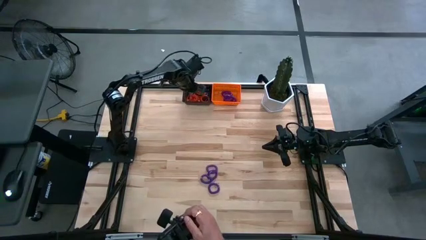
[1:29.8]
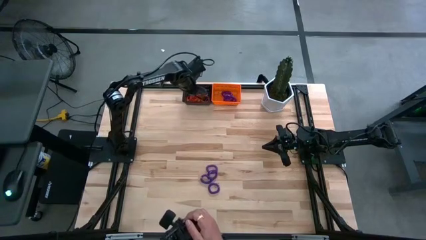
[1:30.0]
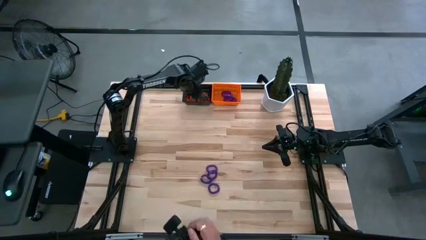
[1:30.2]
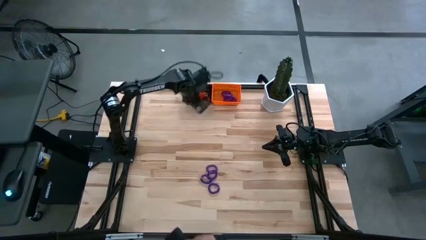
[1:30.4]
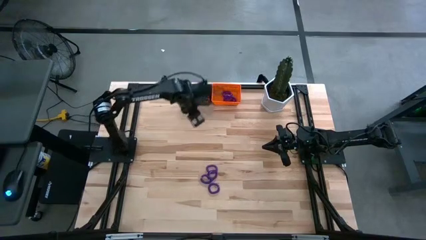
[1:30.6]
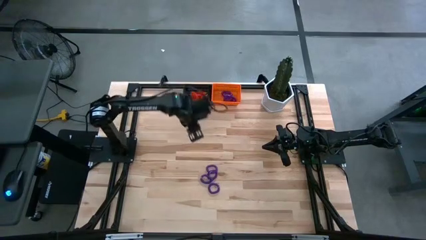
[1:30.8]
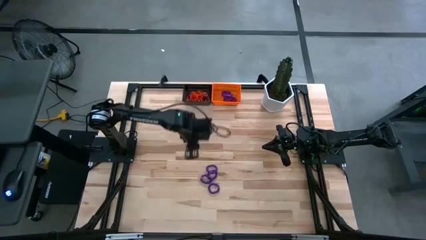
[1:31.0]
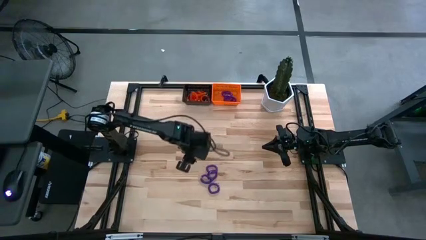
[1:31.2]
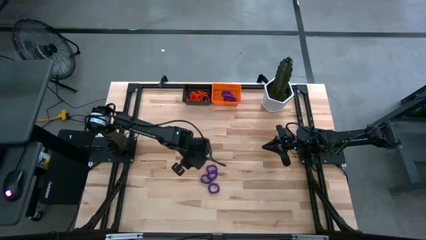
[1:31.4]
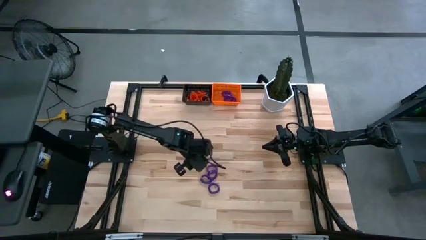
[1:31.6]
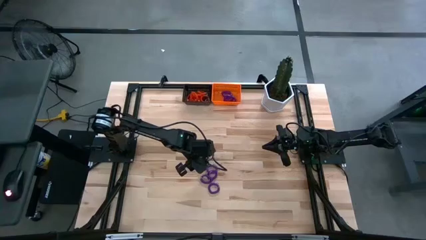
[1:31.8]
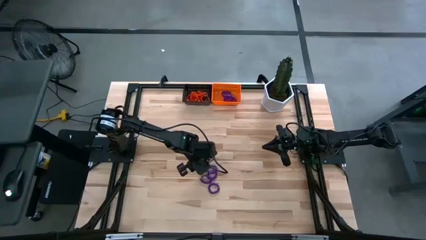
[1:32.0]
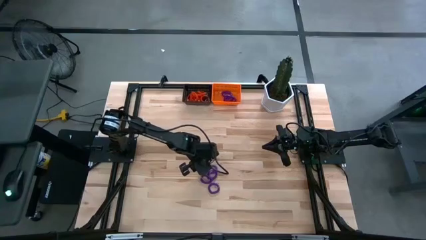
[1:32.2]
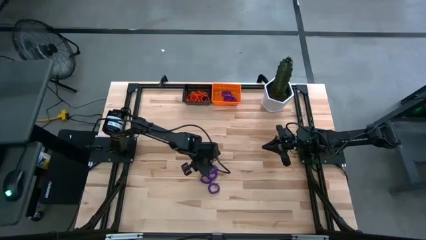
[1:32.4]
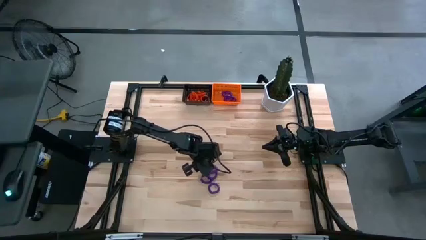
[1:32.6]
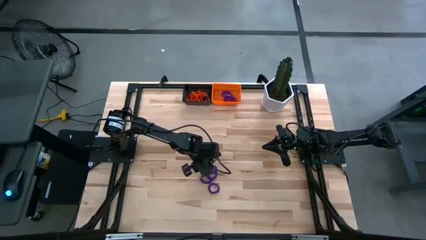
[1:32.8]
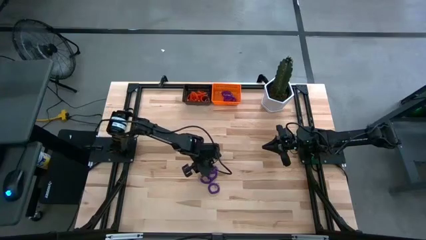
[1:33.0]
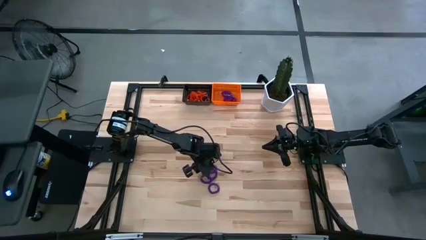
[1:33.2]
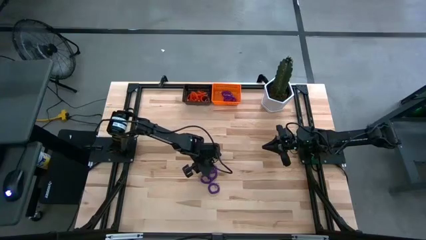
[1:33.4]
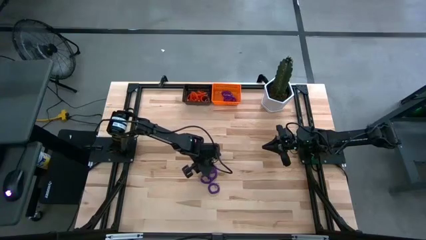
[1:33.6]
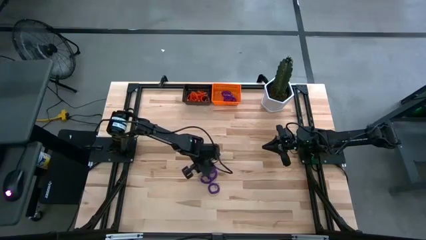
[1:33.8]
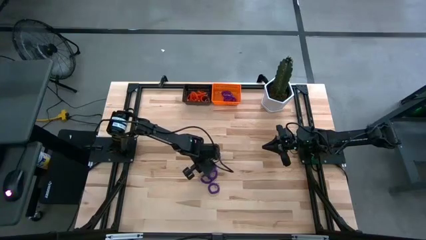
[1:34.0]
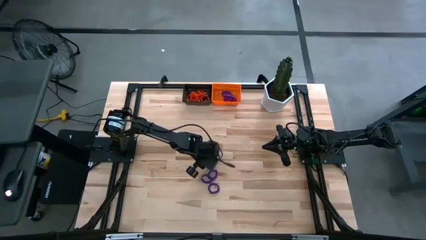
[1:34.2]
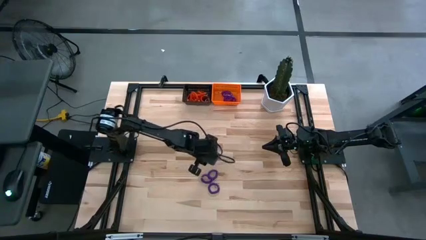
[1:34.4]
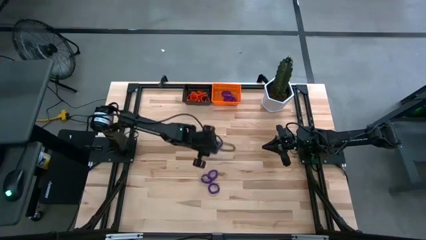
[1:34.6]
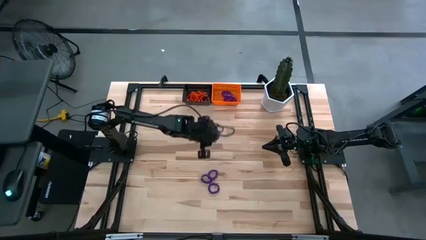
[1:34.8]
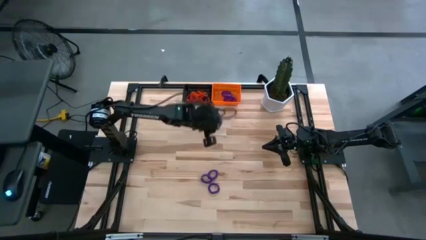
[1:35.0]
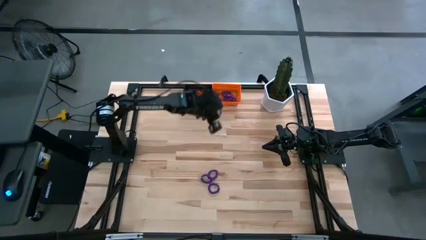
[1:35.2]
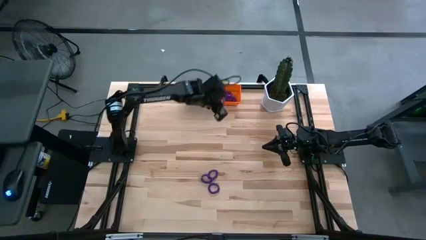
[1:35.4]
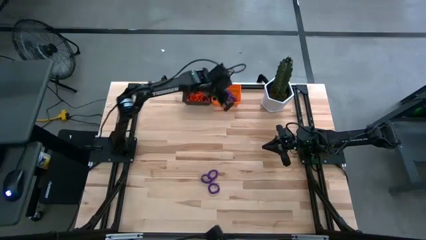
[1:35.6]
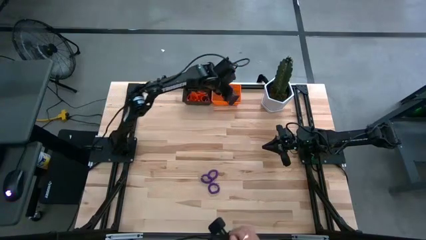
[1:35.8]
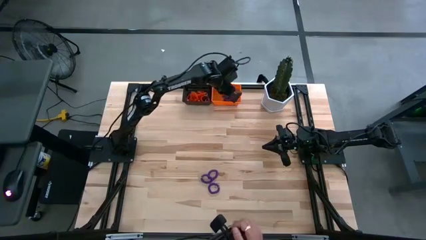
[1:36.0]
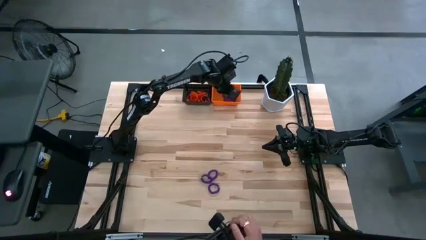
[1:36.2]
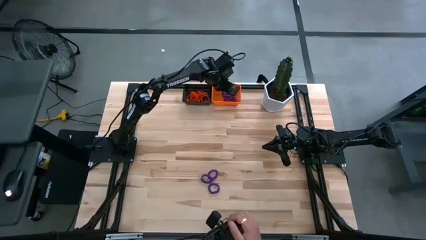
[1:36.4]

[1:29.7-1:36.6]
Task: Sort spring keychains into baskets
Put the violet spring keychain into the orange basket

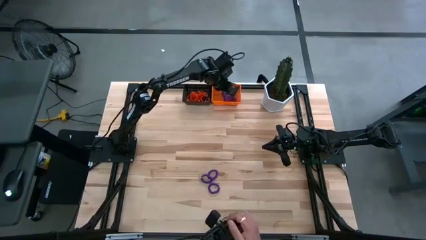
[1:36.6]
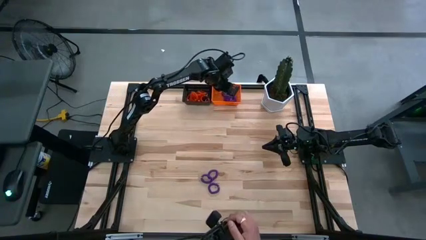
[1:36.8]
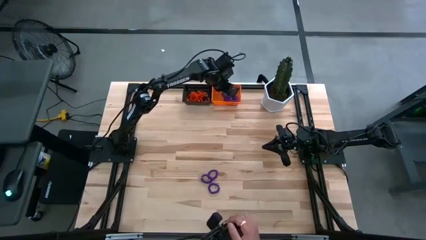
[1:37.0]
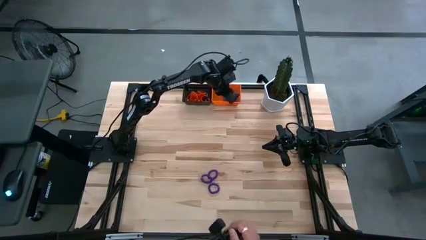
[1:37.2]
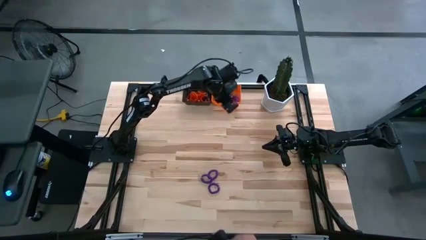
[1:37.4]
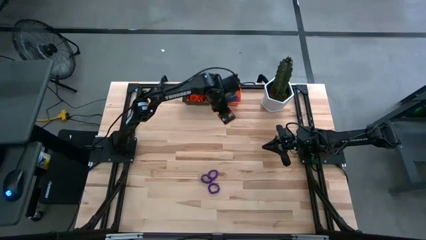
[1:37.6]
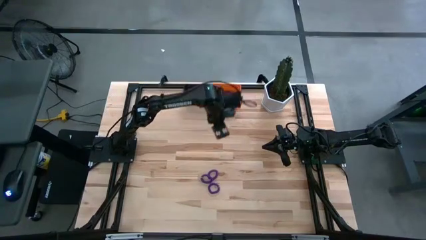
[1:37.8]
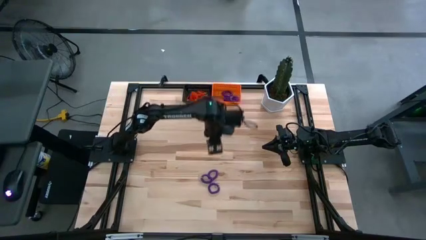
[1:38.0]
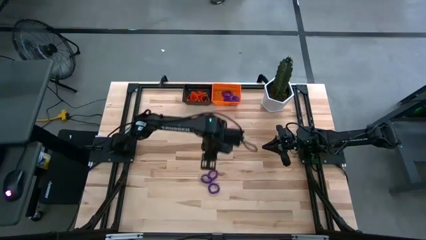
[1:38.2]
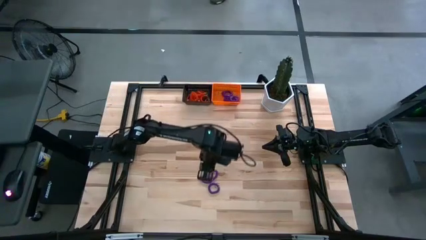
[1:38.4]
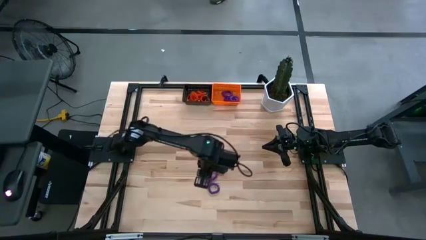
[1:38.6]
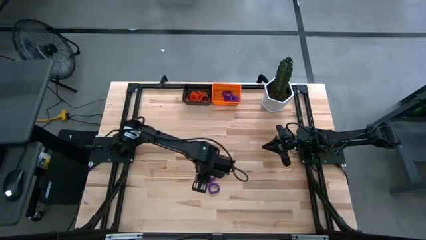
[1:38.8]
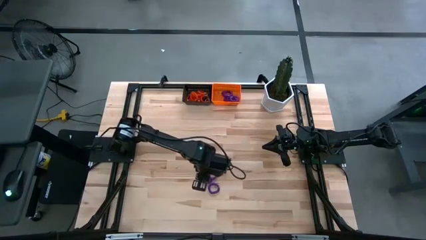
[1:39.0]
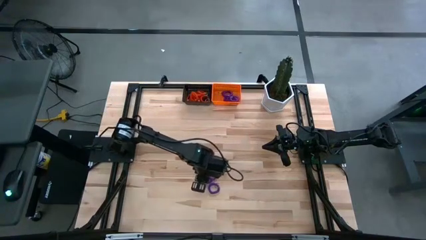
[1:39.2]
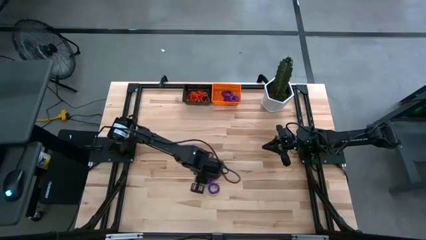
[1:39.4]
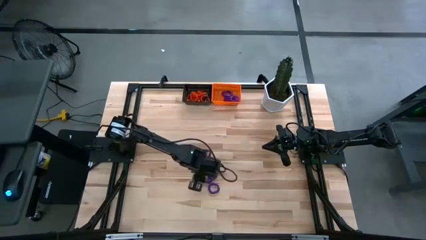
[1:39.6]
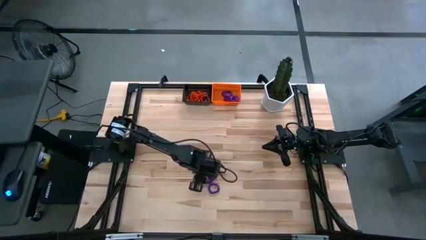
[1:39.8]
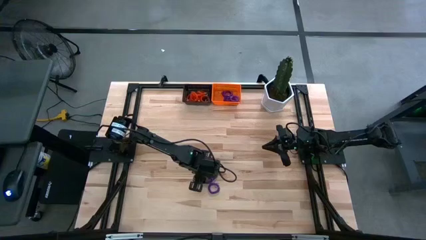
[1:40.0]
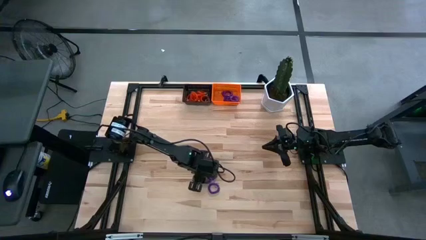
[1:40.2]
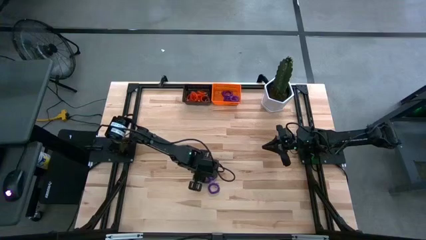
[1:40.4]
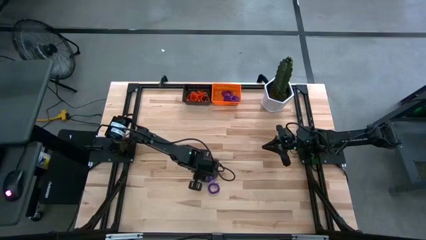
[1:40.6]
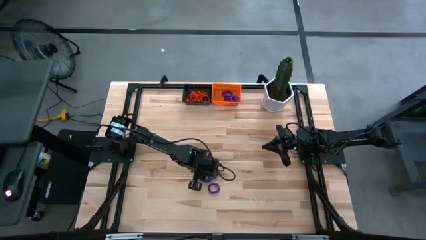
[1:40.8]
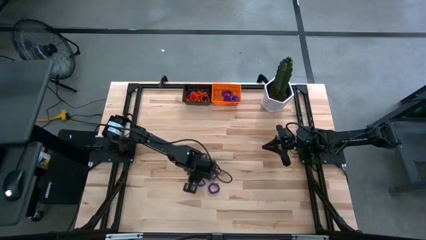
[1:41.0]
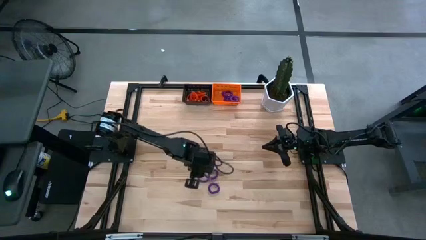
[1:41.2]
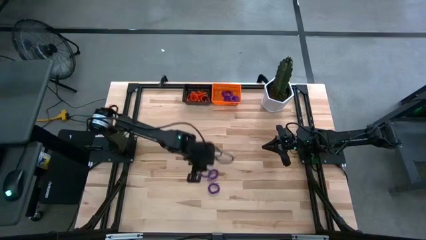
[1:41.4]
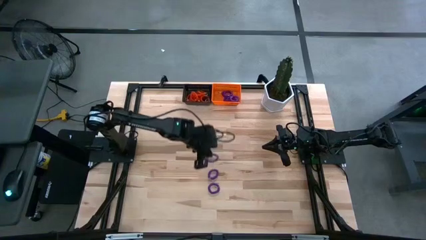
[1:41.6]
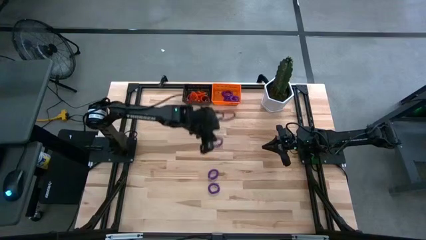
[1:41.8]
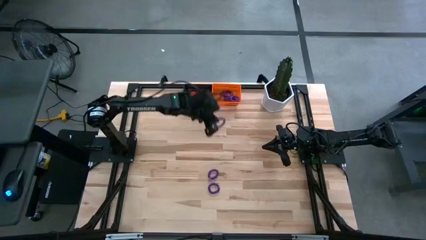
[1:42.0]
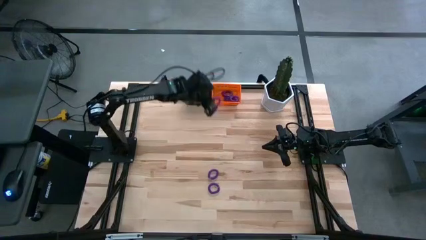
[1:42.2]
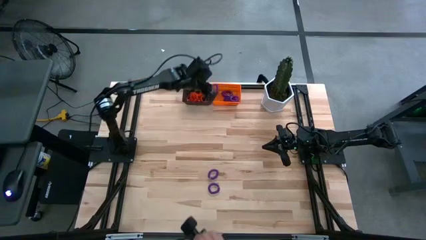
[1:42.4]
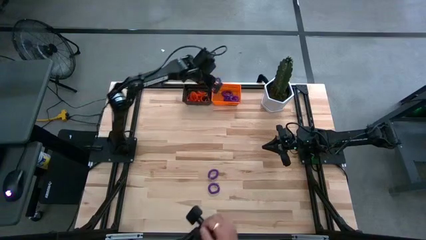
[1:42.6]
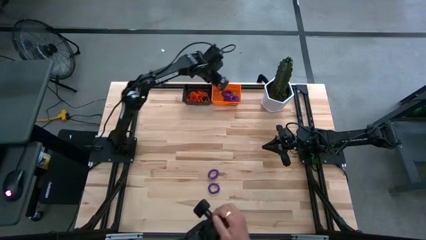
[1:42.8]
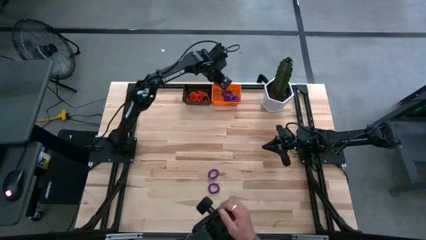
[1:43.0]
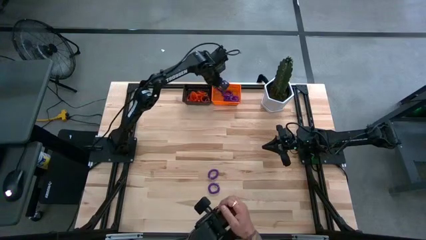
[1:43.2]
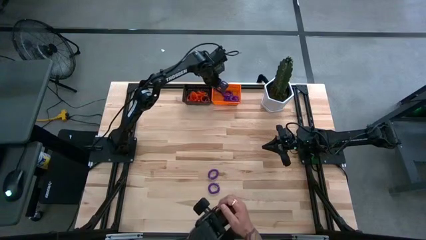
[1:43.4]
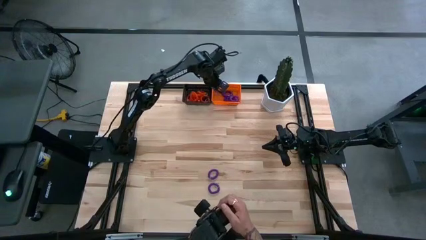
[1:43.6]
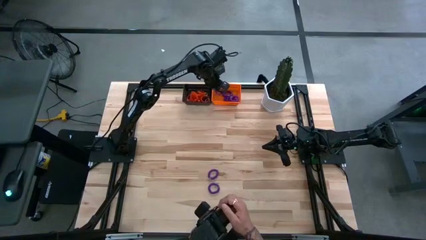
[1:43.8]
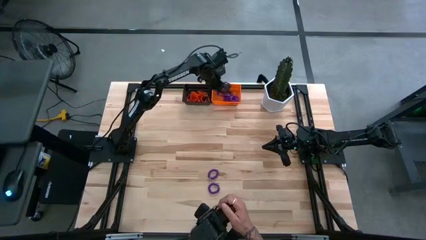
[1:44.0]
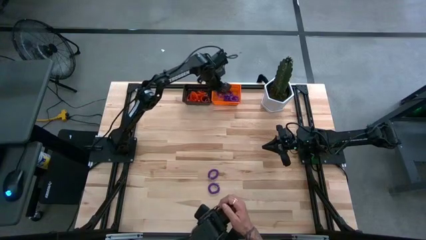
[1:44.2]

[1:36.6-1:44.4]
Put the violet spring keychain into the orange basket

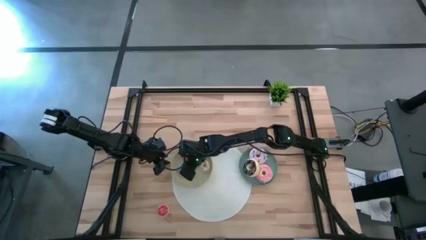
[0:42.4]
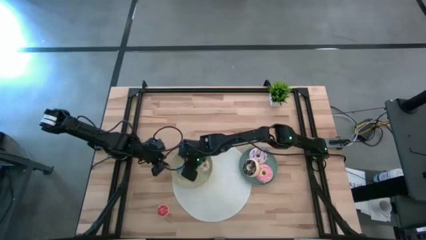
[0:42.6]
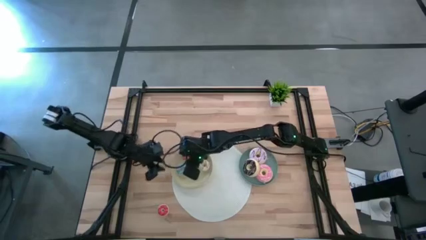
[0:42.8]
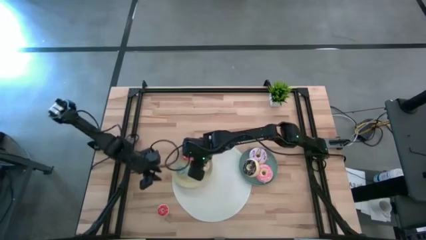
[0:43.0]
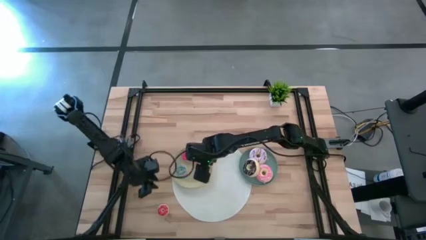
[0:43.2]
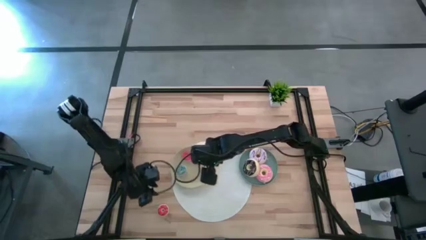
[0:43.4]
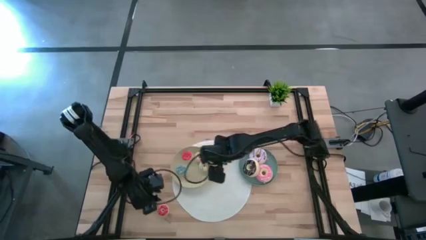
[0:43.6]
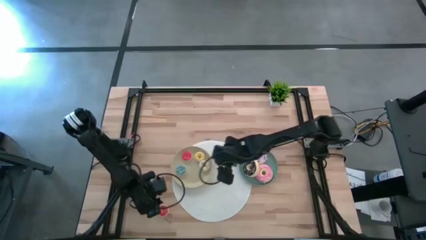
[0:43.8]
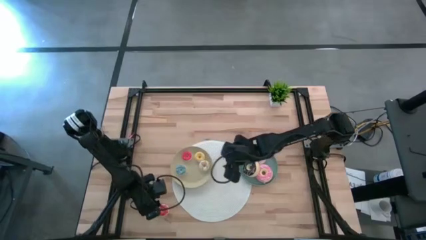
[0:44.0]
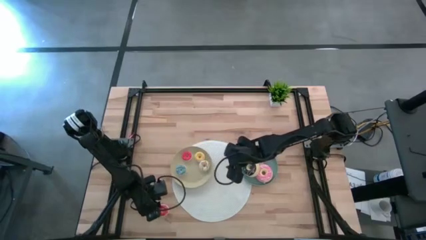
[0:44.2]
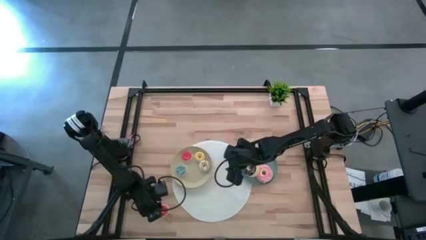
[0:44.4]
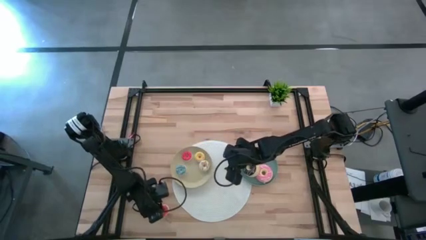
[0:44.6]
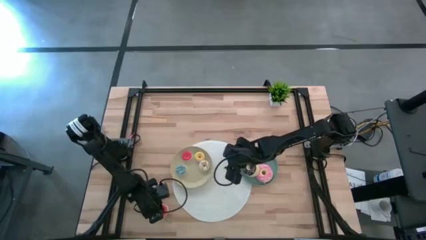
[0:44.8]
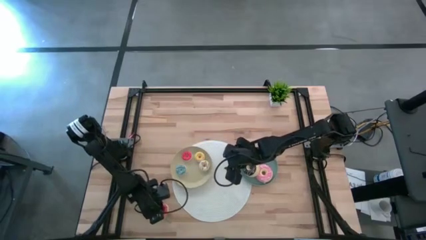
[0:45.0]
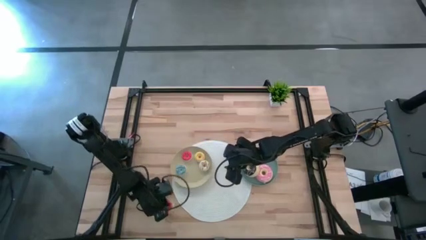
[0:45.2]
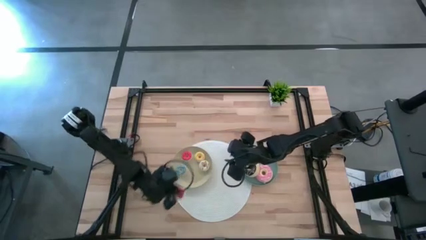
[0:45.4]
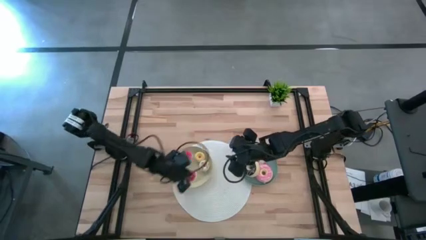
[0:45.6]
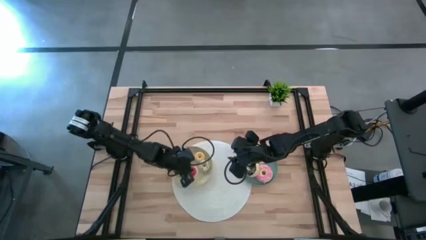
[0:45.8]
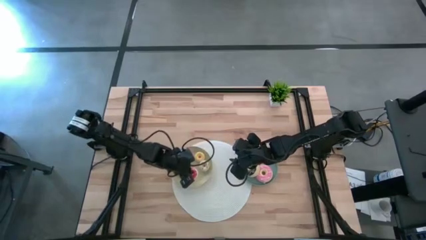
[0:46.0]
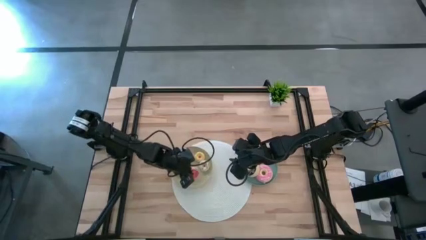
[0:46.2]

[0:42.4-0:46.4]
Task: Pick & Place donuts
Put the small orange donut on the brown plate
